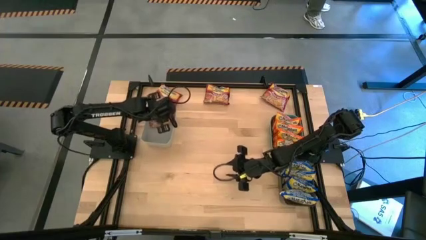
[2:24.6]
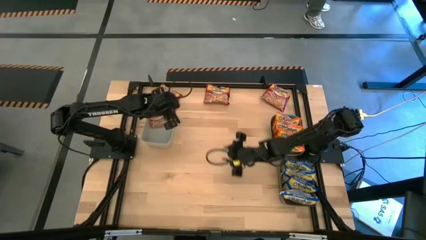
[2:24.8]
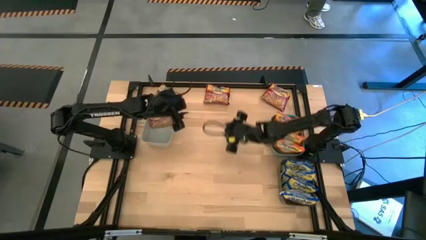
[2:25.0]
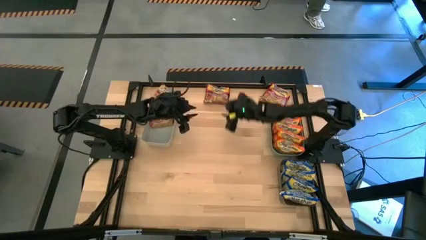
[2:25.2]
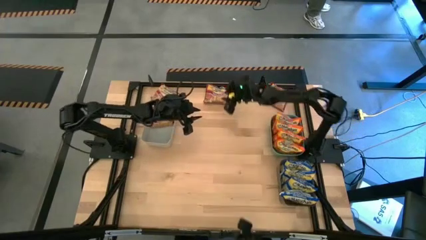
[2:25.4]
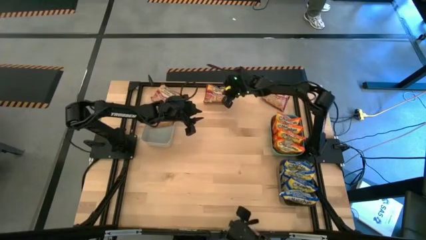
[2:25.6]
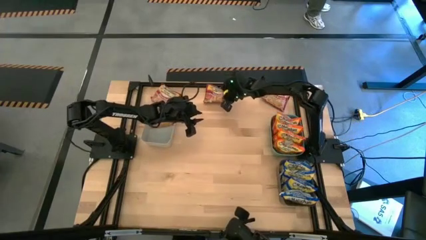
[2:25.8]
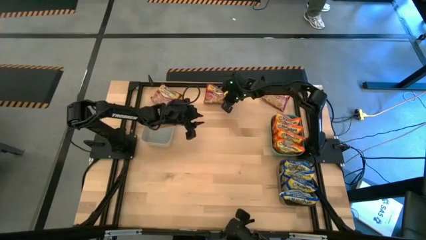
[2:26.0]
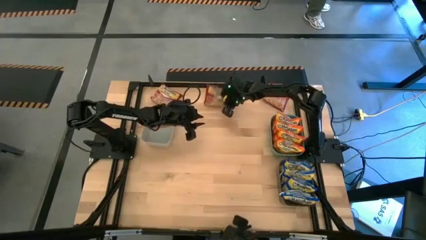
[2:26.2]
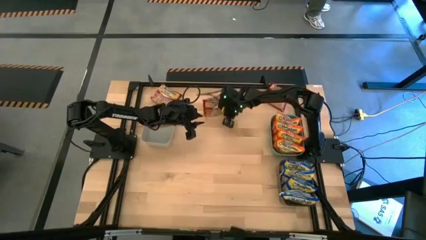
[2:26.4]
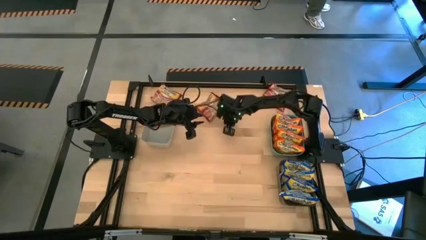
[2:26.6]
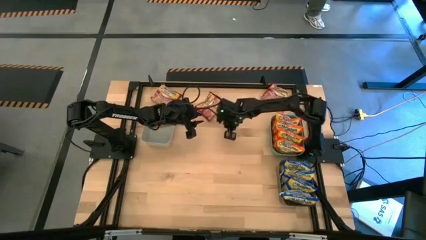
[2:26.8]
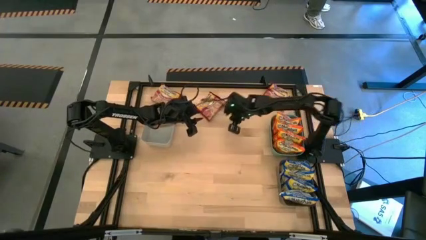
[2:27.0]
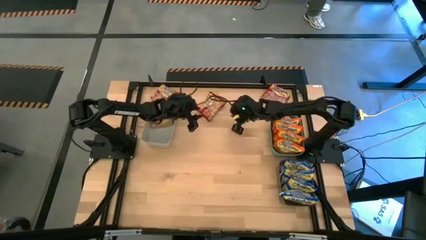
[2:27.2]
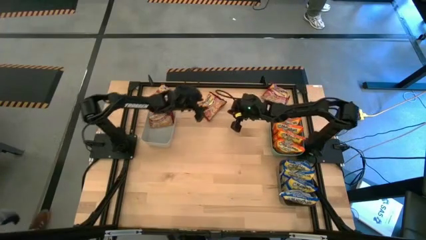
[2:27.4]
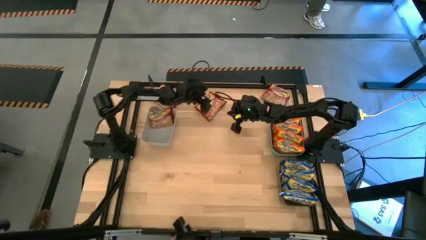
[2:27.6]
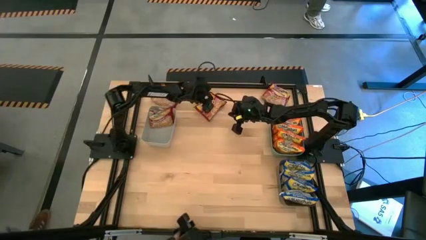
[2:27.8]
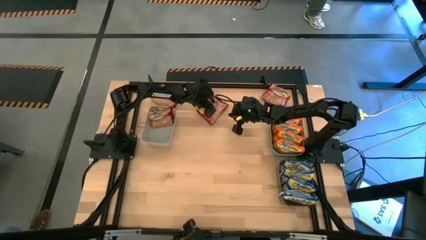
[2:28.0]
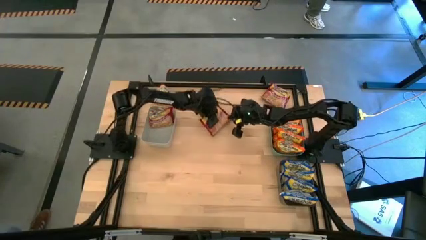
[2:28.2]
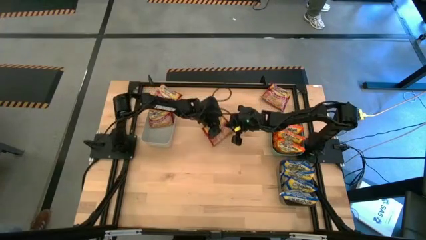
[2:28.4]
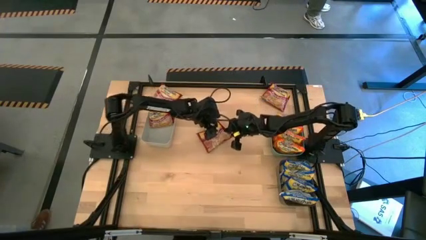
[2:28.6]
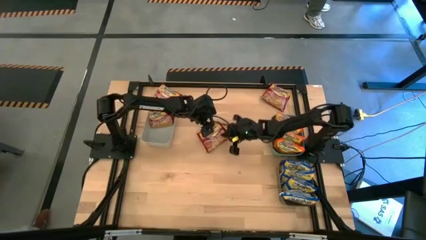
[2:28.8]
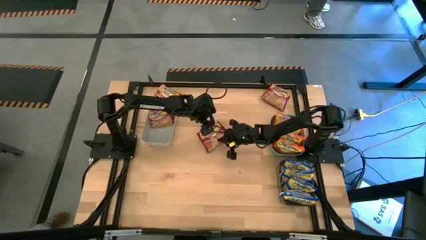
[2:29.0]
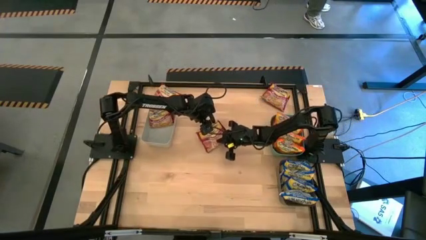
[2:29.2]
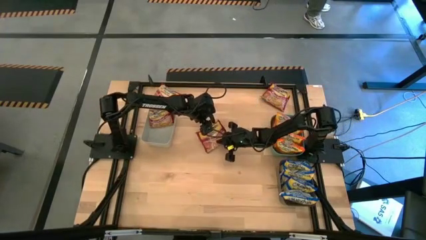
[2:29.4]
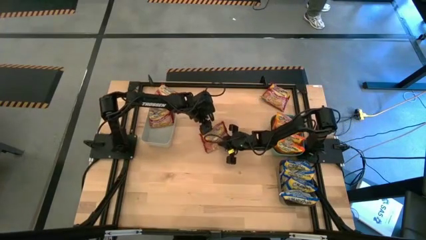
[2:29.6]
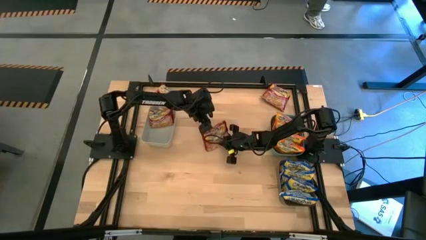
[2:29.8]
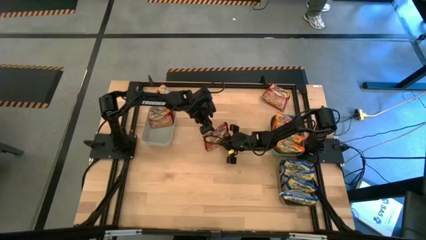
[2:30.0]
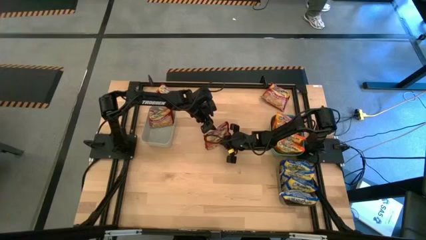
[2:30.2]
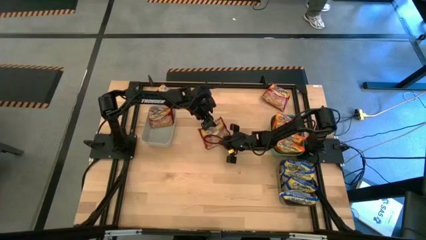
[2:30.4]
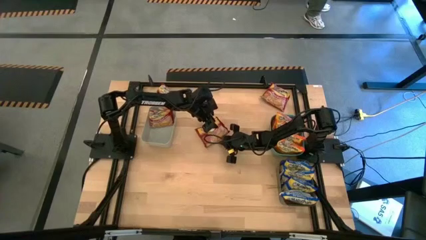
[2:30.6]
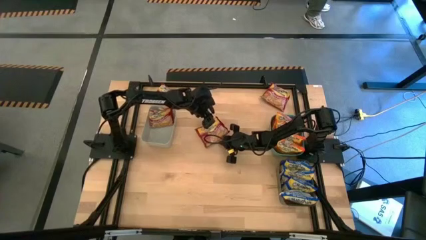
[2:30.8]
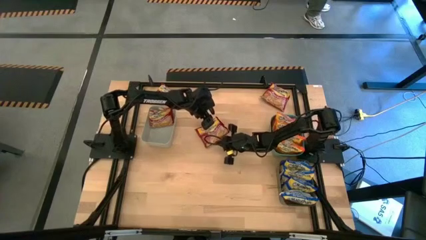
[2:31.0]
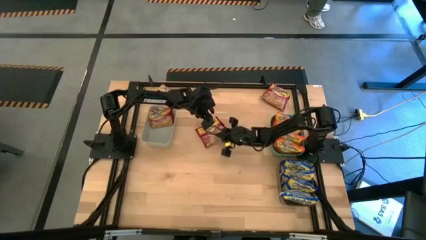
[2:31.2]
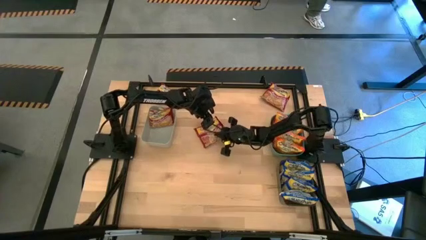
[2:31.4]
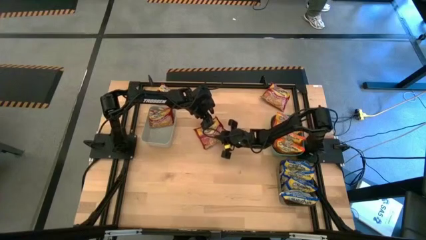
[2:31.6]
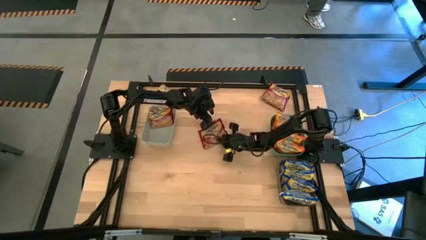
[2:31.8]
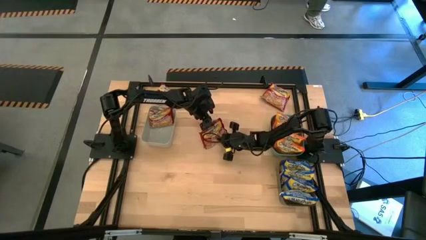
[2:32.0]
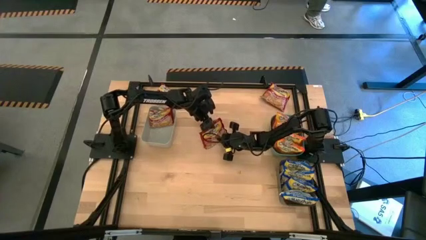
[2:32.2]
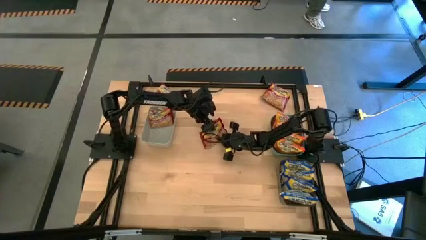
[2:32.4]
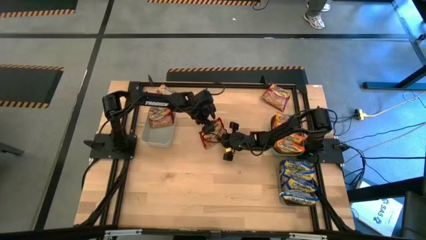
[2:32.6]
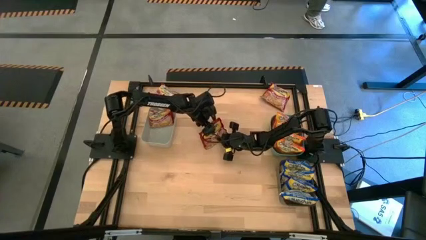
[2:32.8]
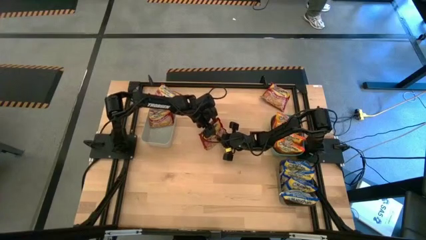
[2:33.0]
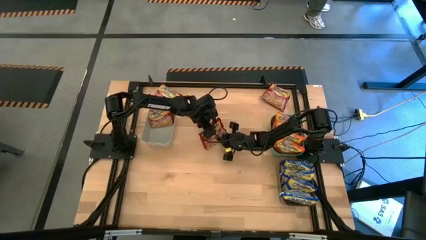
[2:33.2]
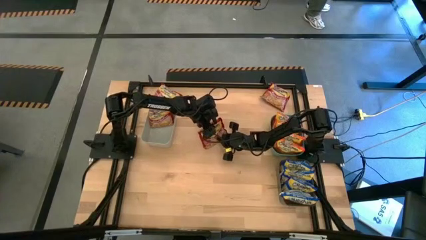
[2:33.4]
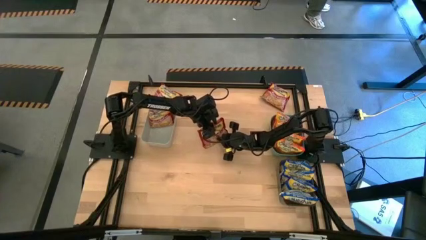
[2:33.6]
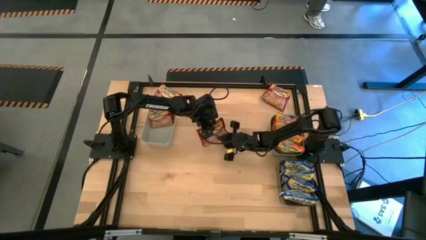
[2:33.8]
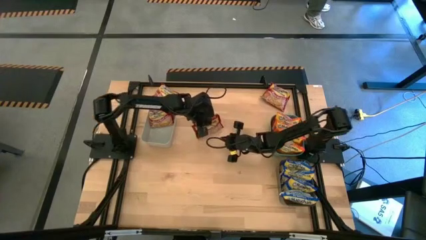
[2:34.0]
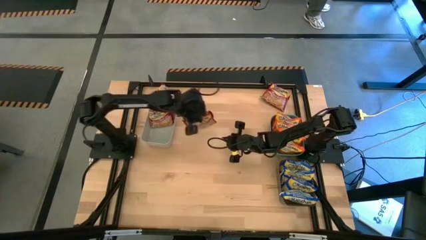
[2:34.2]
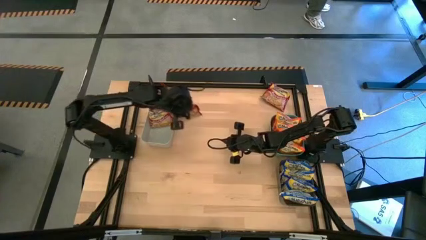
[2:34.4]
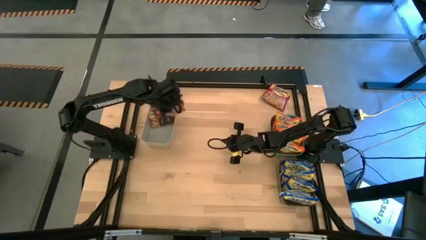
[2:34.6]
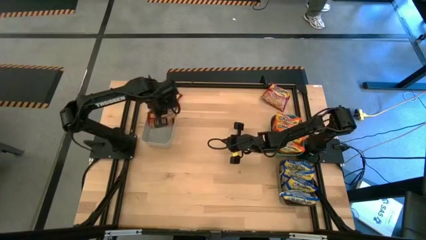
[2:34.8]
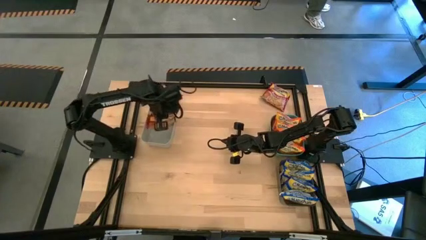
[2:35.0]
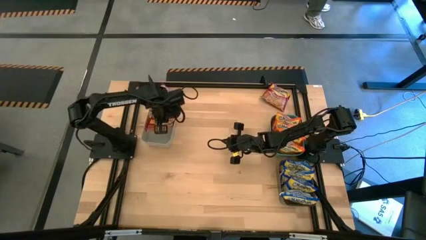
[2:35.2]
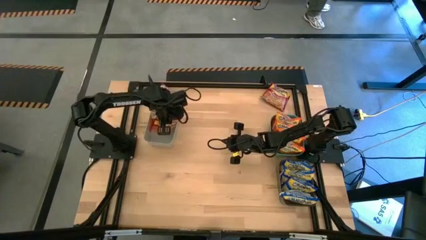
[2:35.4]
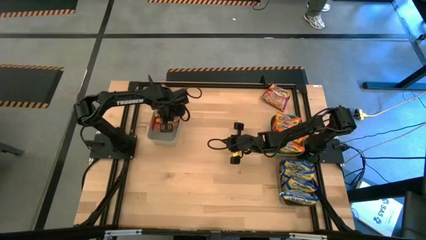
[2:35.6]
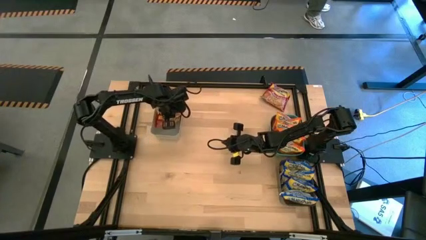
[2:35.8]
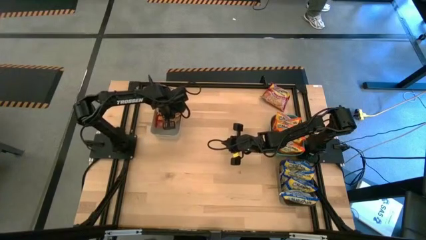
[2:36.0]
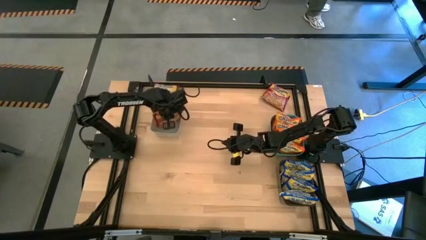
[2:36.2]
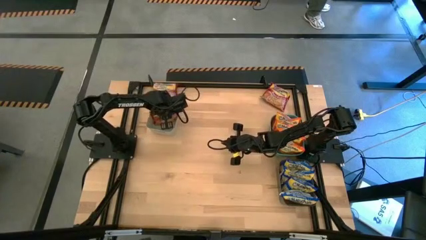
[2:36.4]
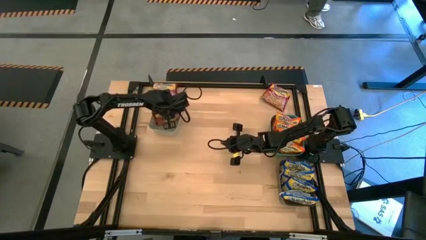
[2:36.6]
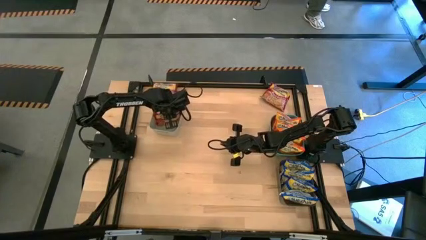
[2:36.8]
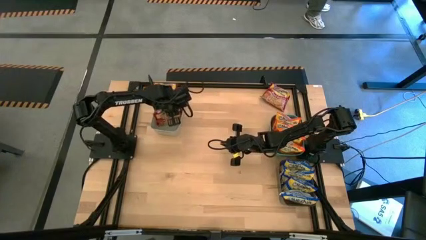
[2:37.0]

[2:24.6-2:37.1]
Task: Sort Maruchan noodles
Put the red noodle pack into the white bin

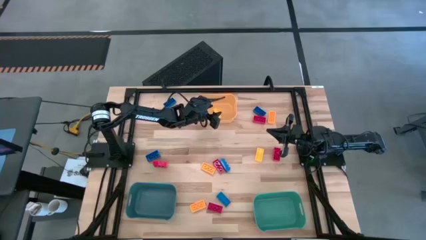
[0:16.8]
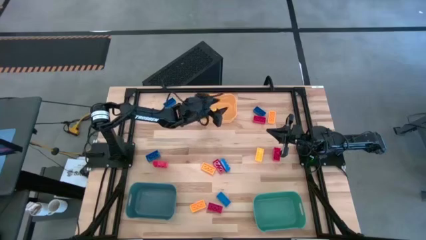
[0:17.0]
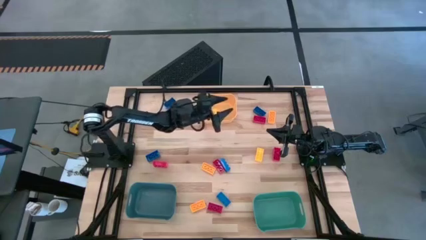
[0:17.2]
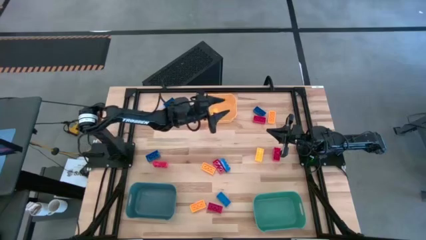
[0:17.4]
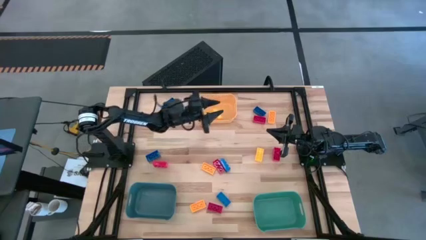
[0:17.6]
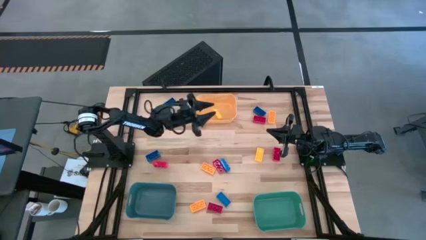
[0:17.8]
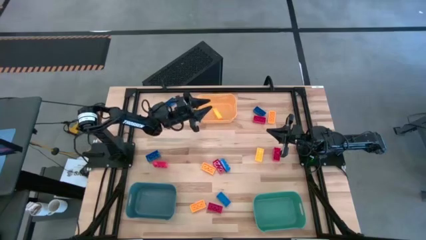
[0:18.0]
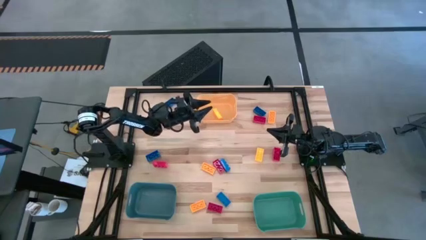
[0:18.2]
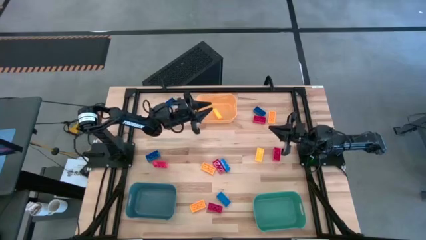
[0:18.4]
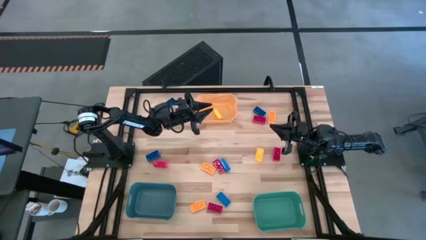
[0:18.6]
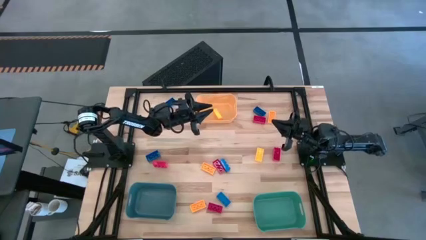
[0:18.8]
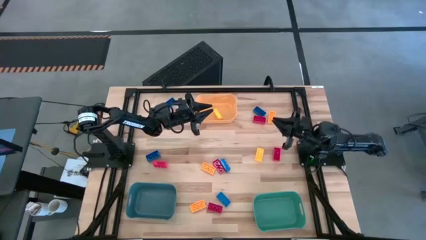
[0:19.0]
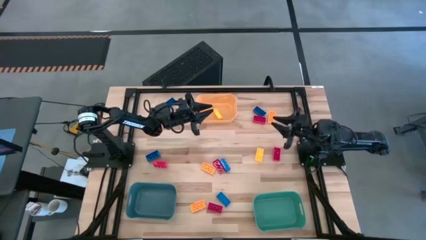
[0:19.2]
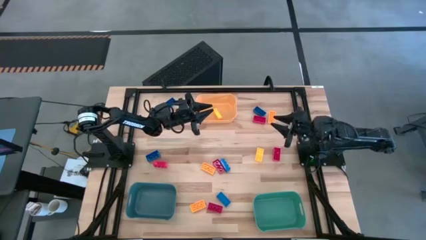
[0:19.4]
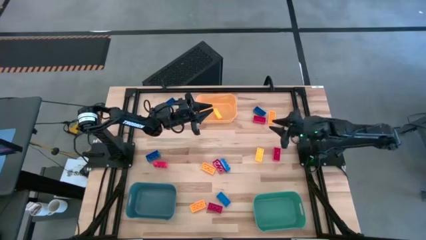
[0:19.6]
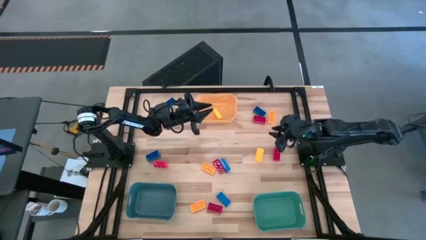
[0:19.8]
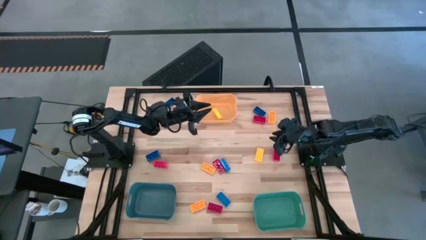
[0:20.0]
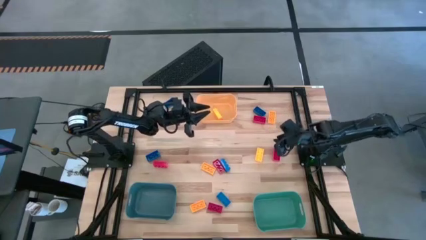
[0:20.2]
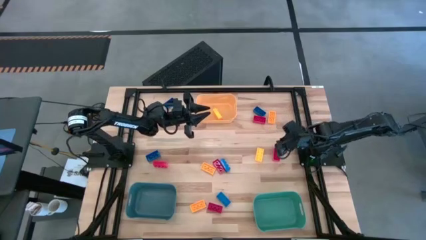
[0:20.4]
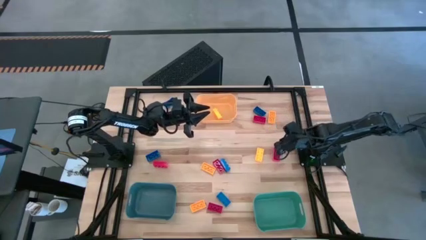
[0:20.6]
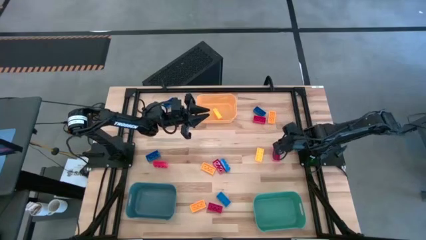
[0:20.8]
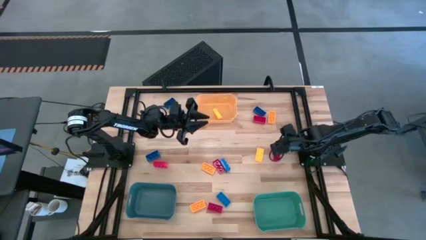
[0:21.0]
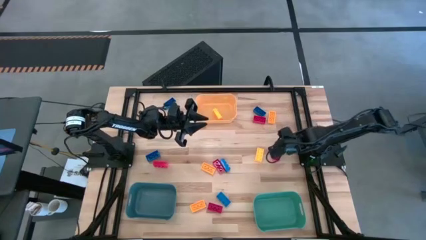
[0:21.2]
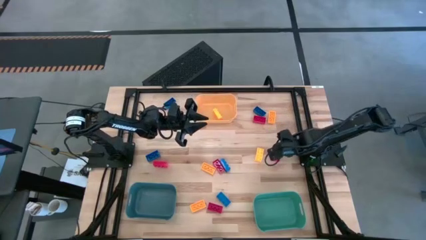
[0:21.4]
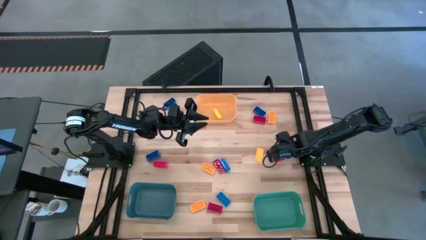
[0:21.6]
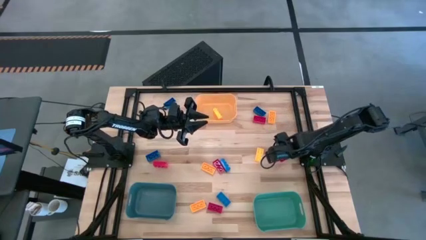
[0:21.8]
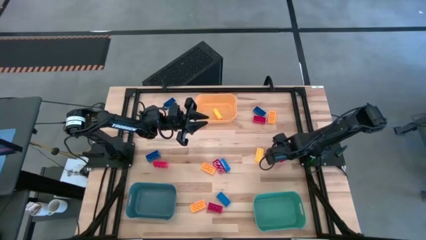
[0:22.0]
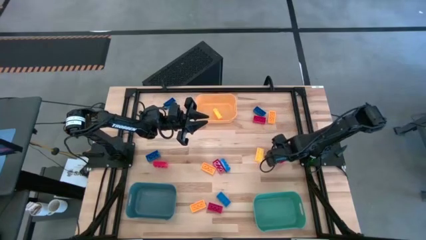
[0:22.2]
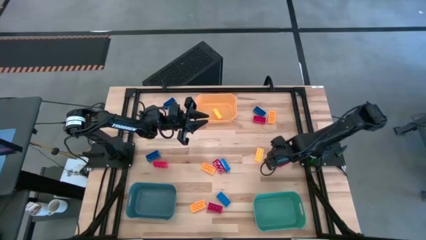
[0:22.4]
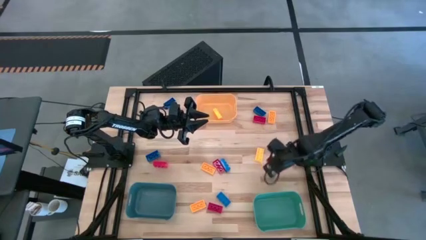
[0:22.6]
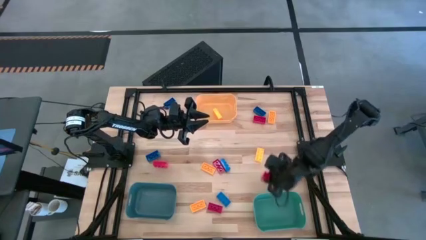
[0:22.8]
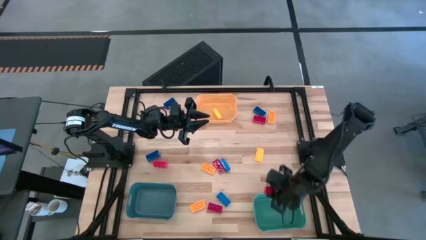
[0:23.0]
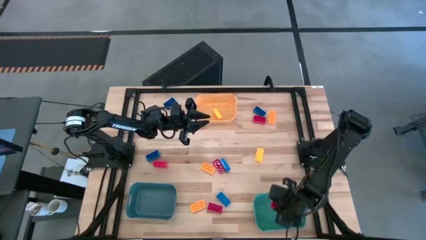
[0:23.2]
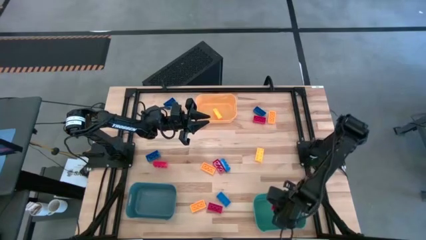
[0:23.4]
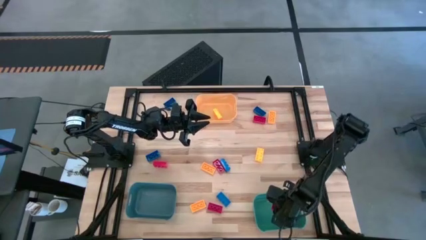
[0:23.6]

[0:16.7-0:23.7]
Task: Sort & place blocks by color
Put the red game piece into the green bin
